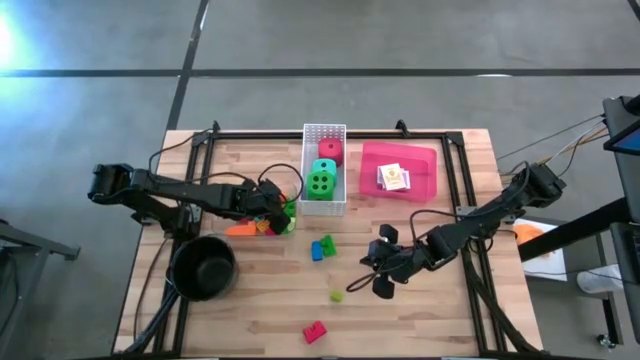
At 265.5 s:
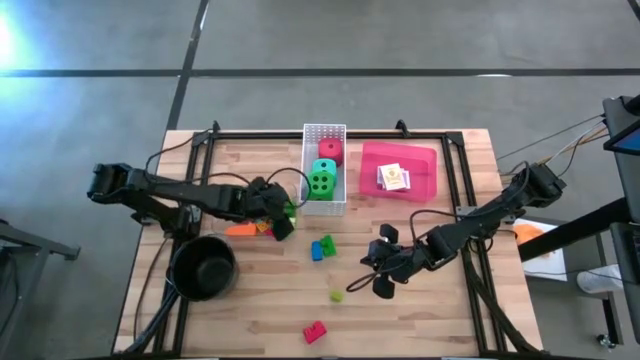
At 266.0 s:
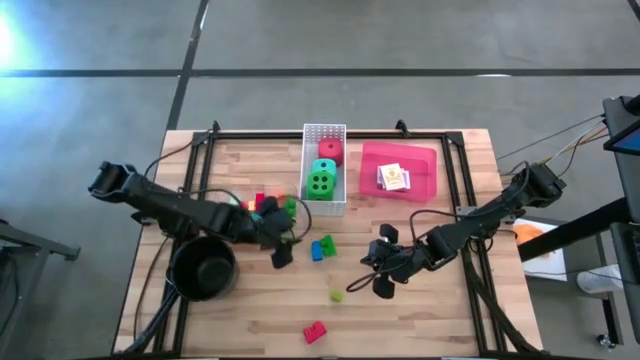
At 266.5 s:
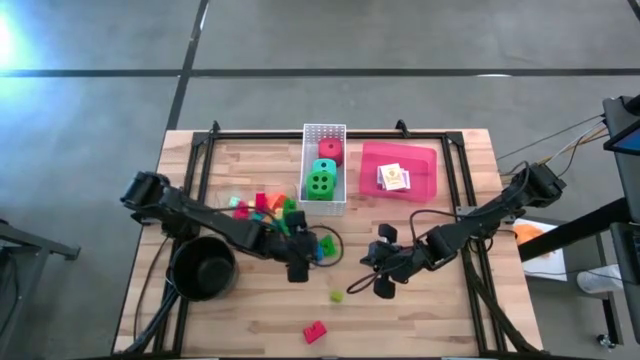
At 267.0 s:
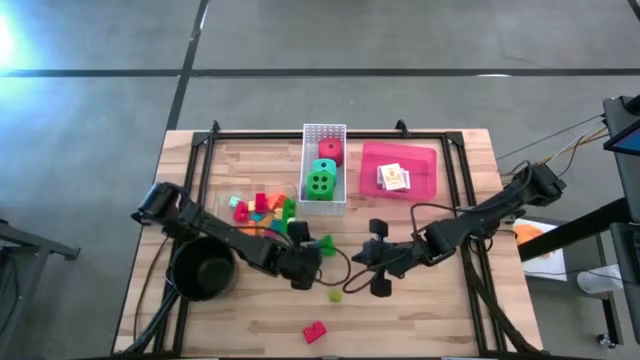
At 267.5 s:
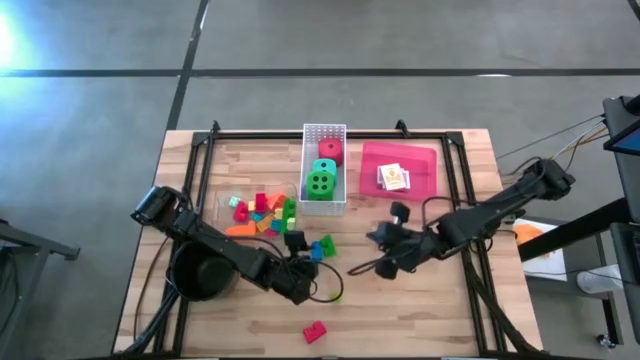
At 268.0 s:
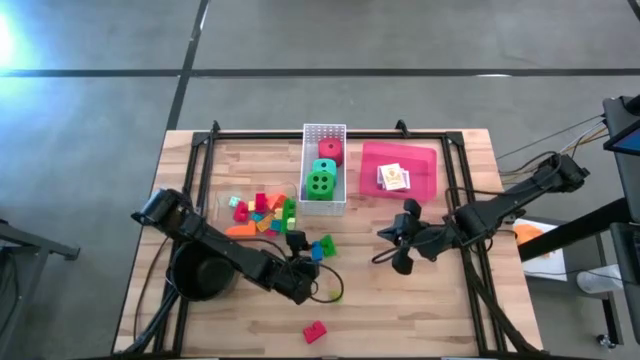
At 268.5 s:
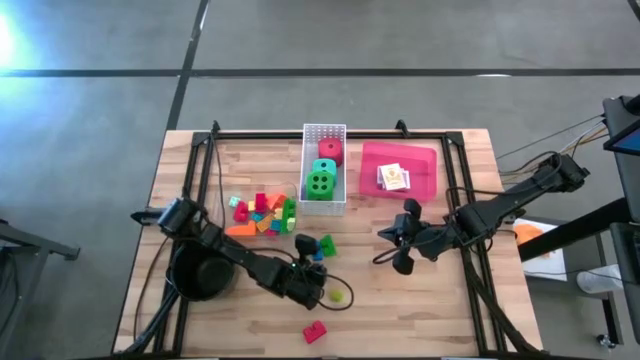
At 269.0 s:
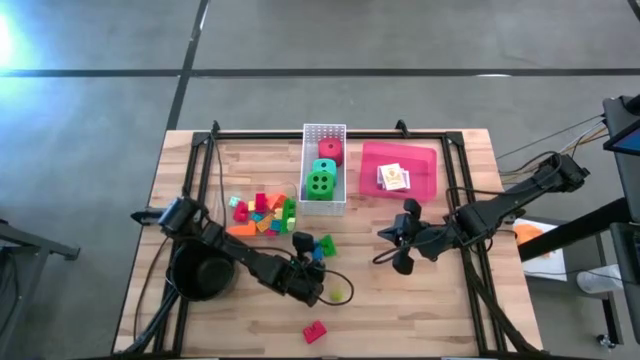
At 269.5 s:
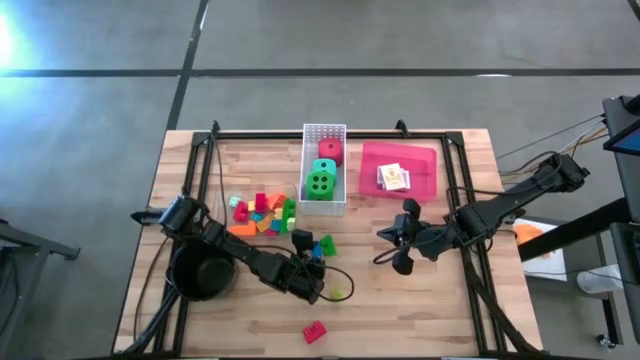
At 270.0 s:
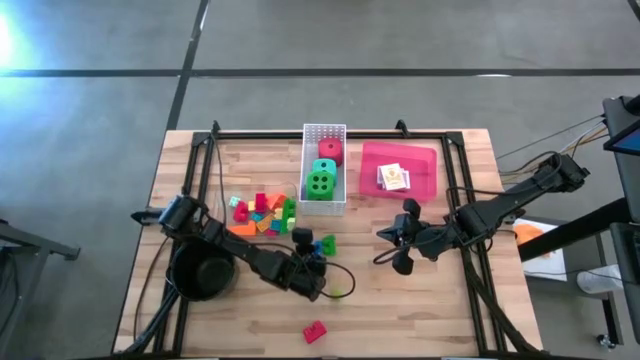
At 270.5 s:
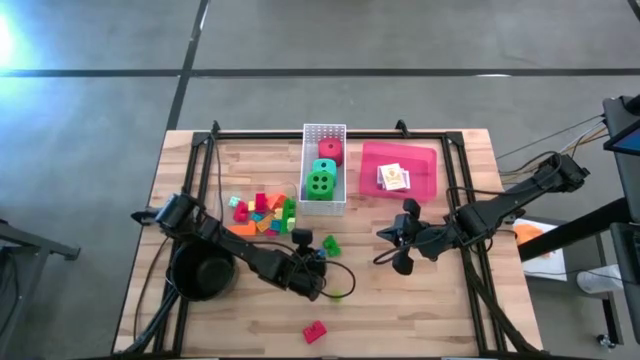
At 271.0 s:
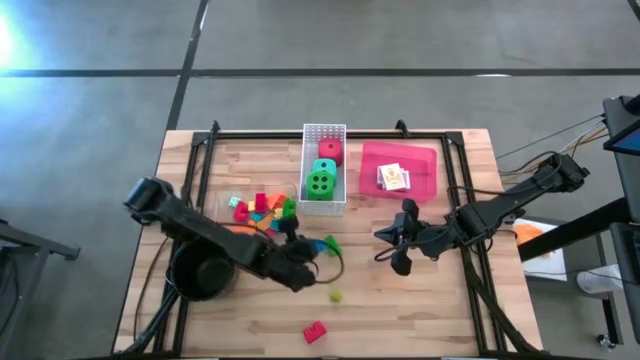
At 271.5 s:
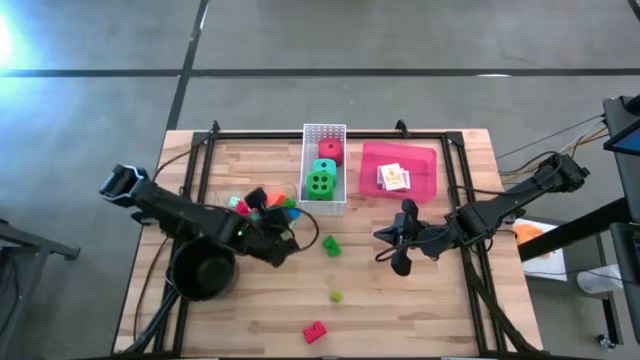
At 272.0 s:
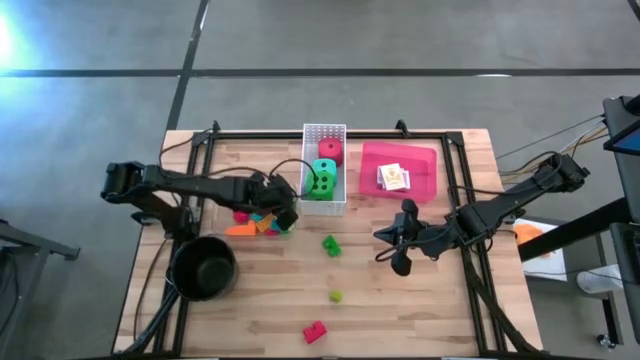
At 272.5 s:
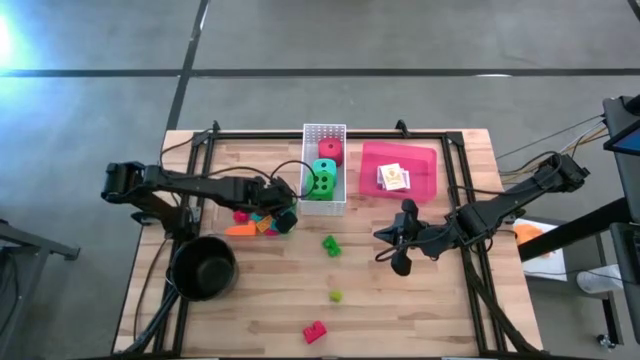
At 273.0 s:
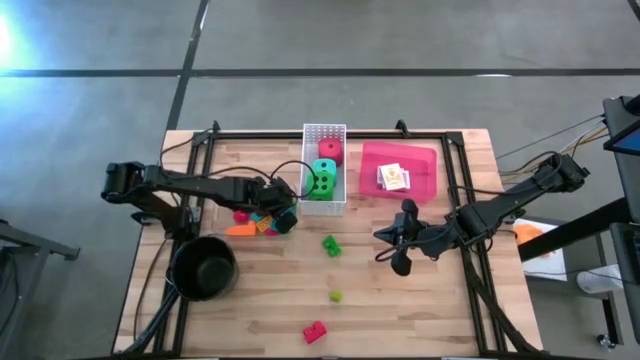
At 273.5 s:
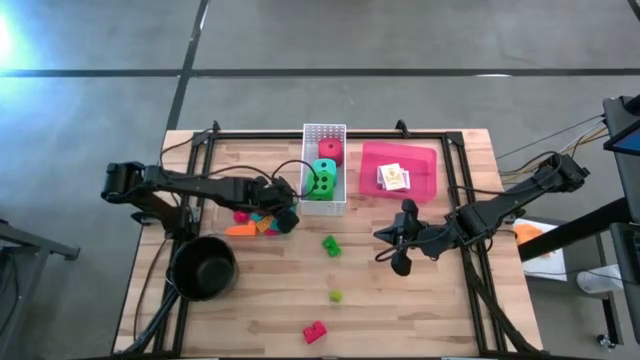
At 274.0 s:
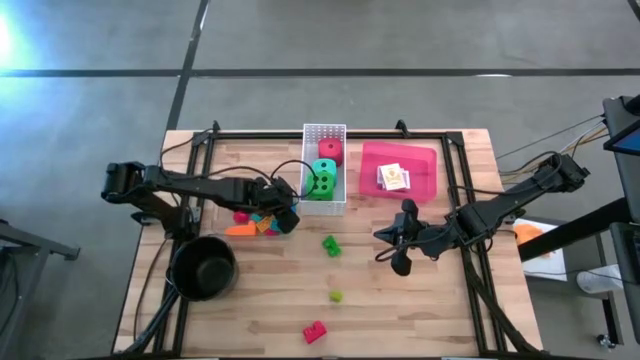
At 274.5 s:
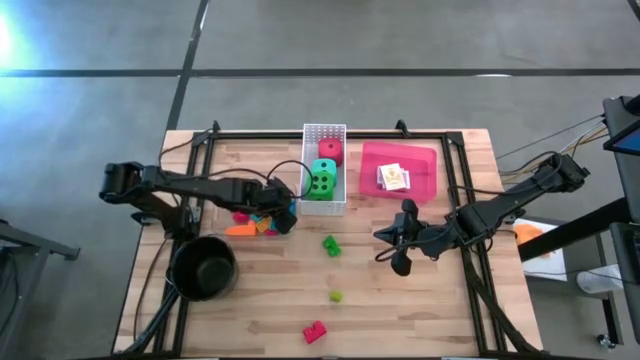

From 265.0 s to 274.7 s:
Task: Pick & Place Toys
Put the blue game piece into the transparent bin

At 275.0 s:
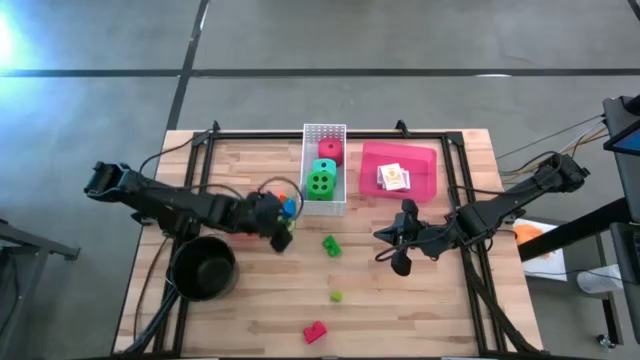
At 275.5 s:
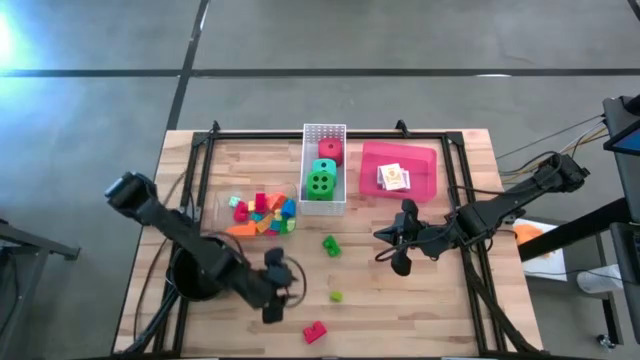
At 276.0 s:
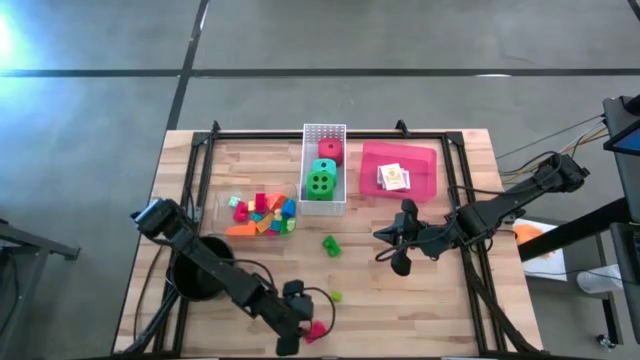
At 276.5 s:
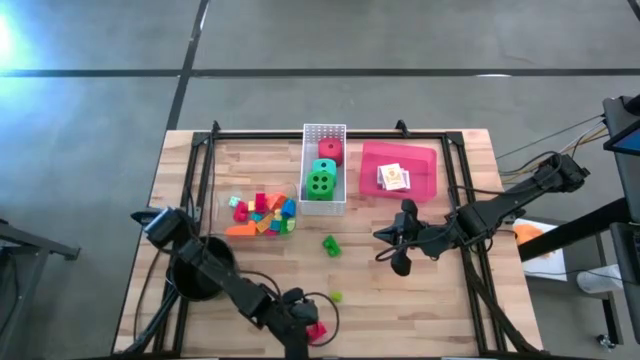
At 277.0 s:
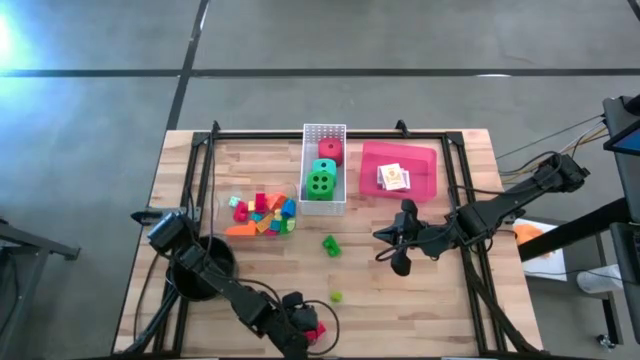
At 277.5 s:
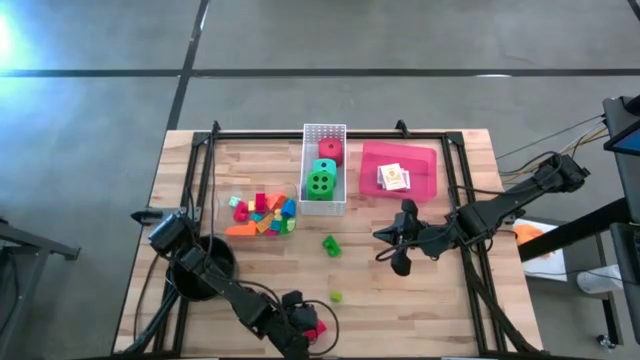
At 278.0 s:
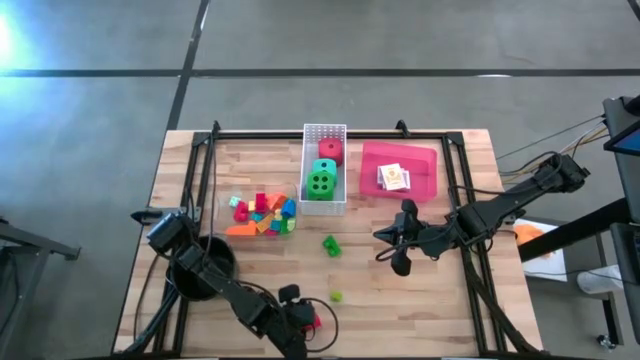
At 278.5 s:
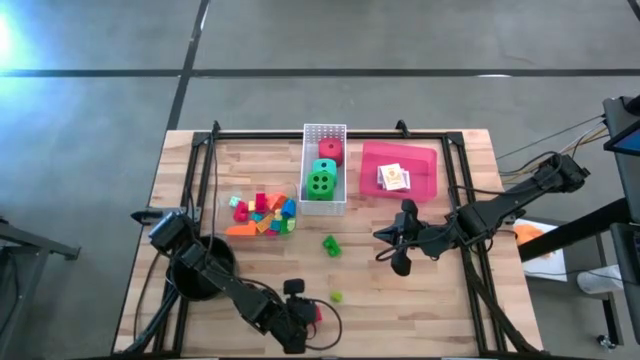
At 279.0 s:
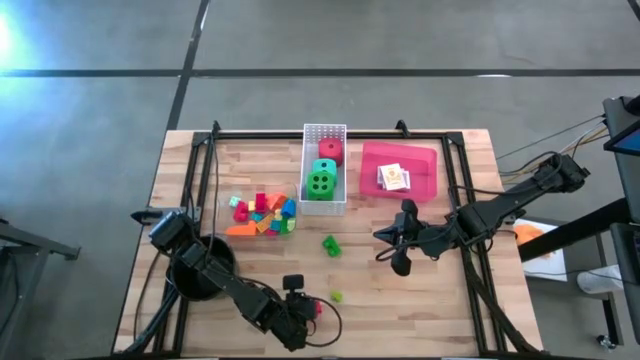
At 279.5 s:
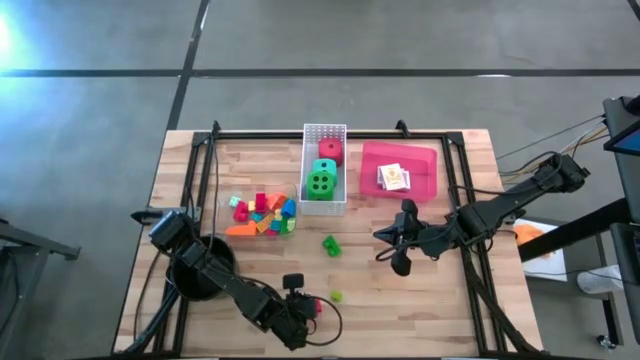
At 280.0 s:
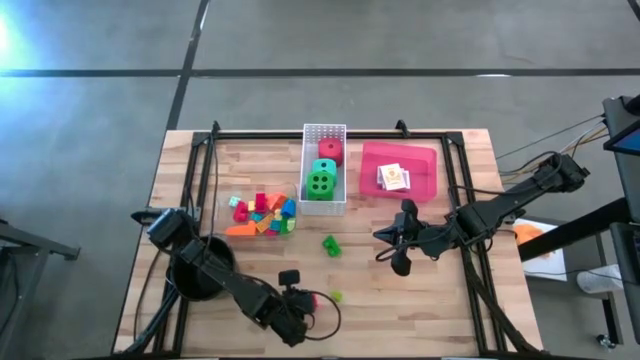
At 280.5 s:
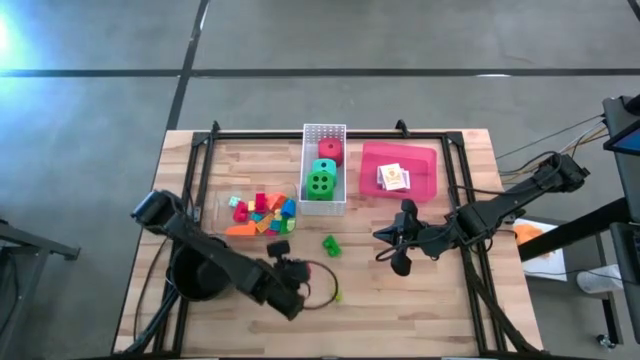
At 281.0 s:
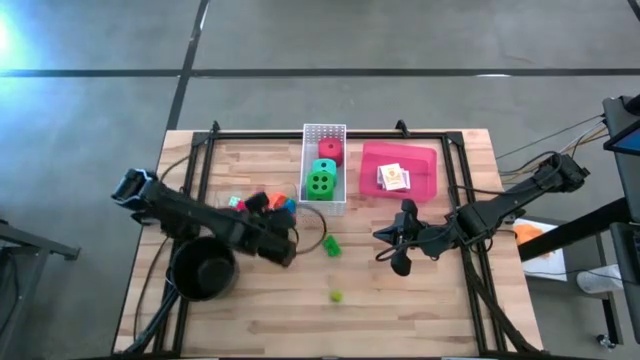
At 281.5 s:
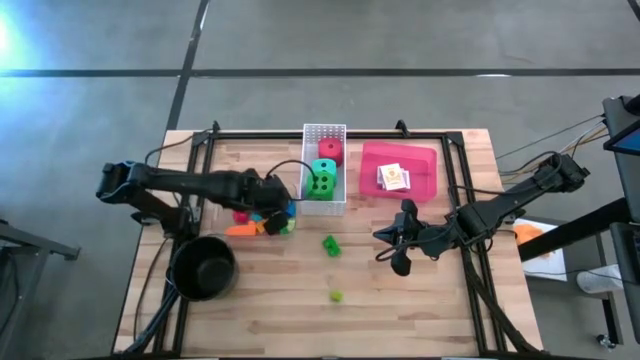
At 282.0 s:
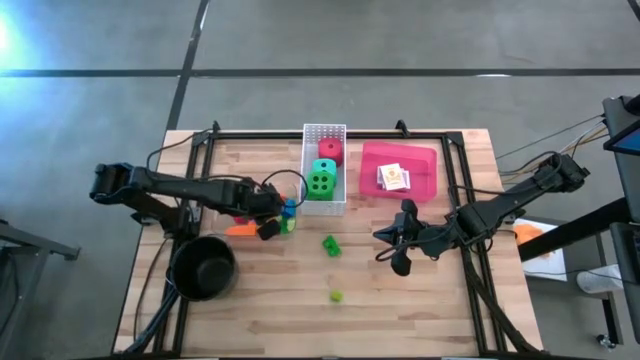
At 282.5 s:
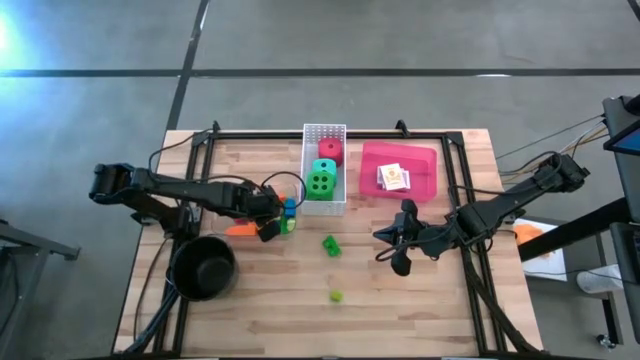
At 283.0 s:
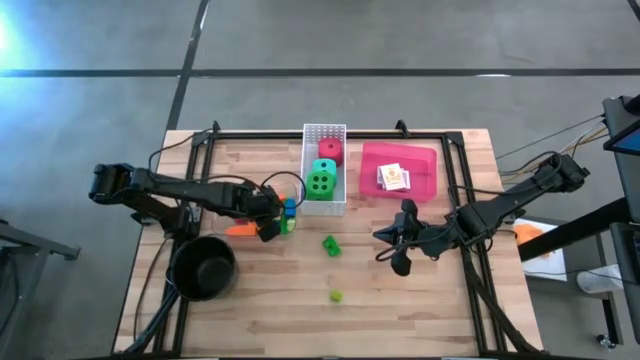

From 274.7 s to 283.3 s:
Put the red game piece into the transparent bin

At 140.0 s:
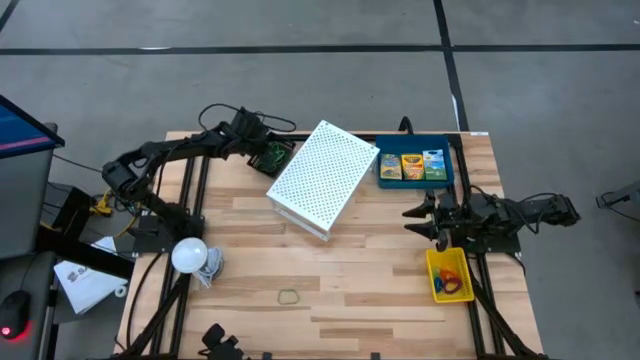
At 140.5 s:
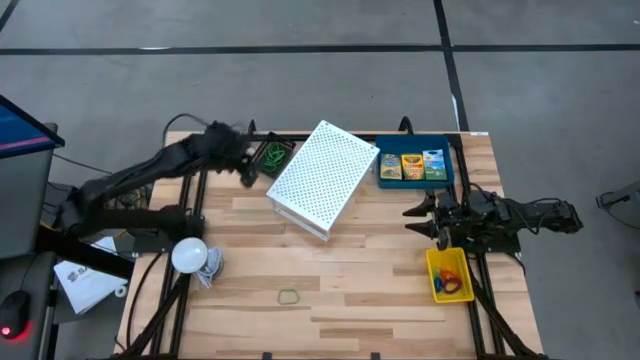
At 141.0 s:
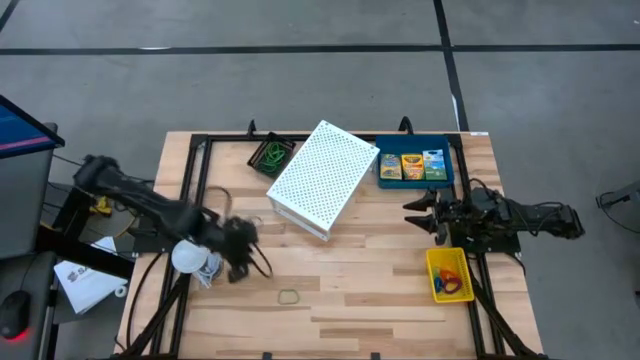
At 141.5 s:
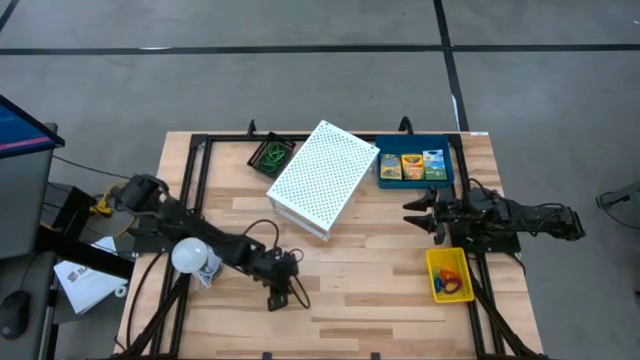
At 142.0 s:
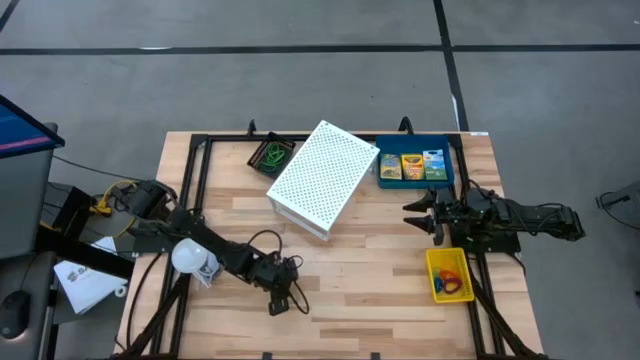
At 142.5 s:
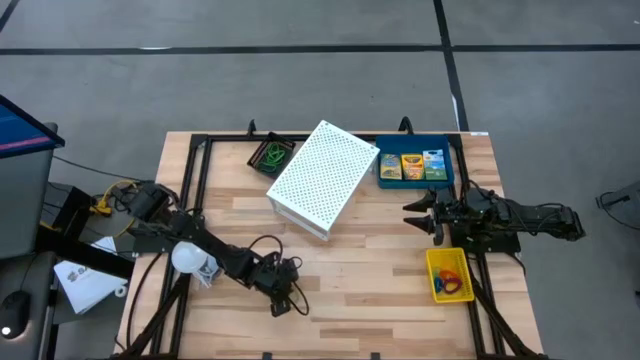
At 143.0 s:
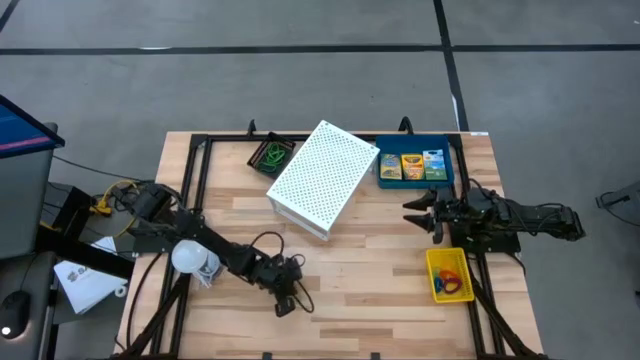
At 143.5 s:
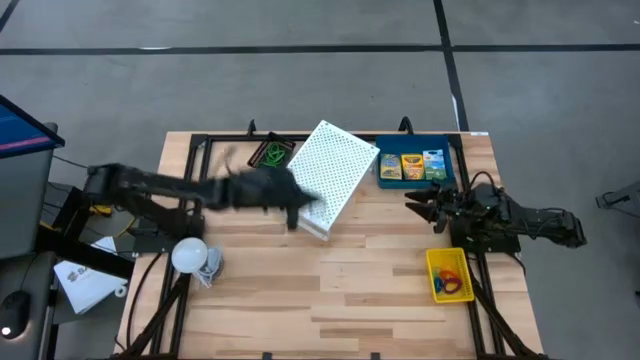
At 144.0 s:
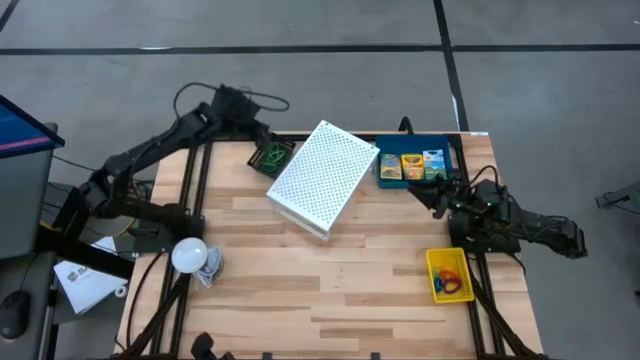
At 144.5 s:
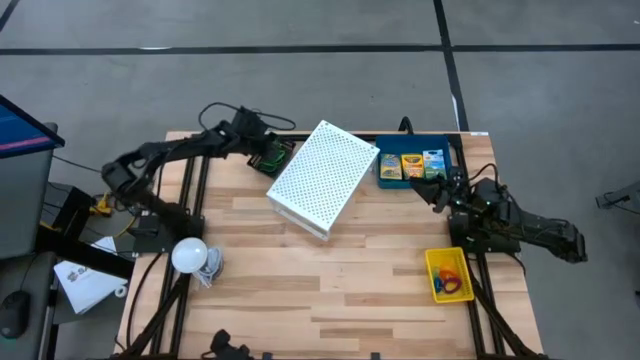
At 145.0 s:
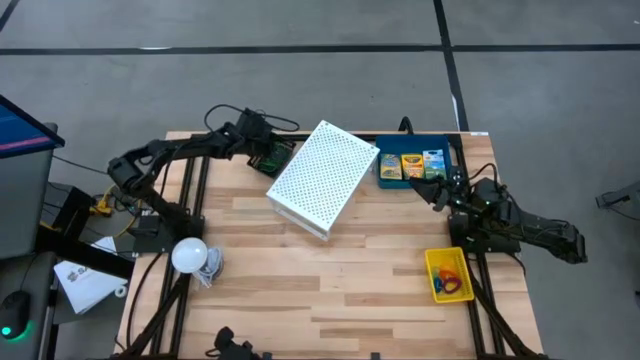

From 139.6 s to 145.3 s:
Task: Pick & Place Office Desk Supplies
Put the green rubber band into the black bin
